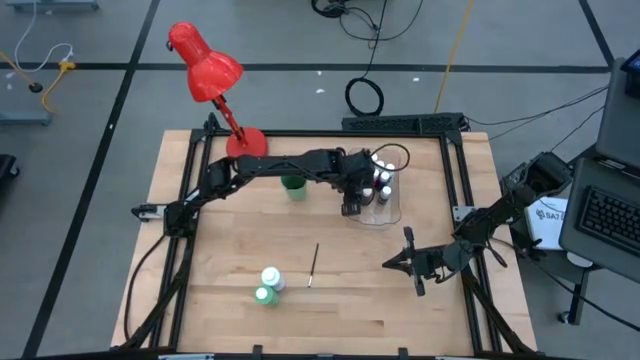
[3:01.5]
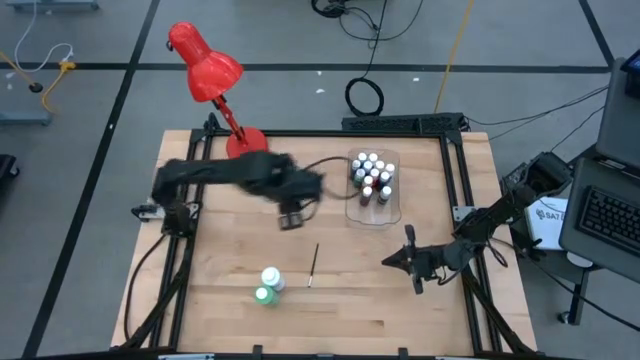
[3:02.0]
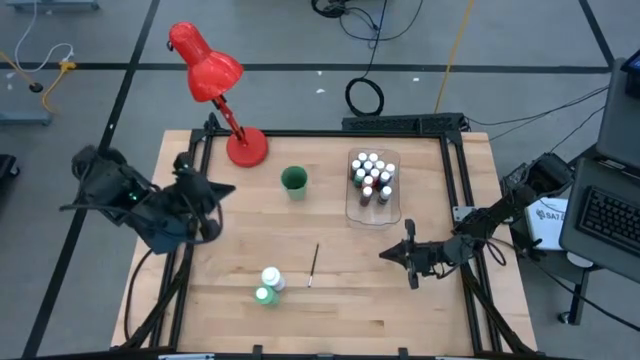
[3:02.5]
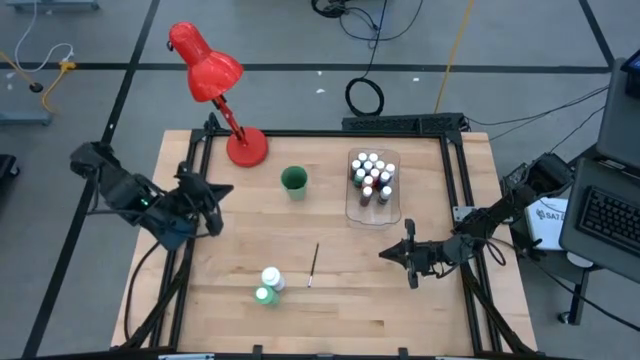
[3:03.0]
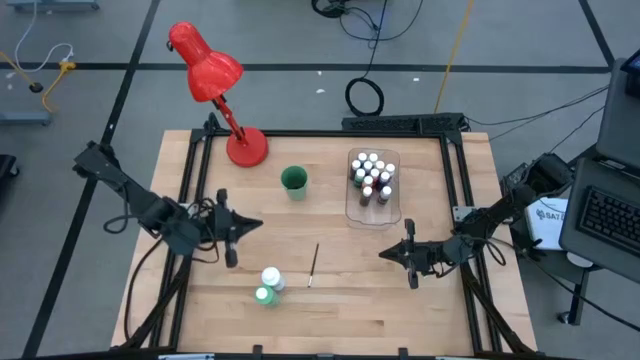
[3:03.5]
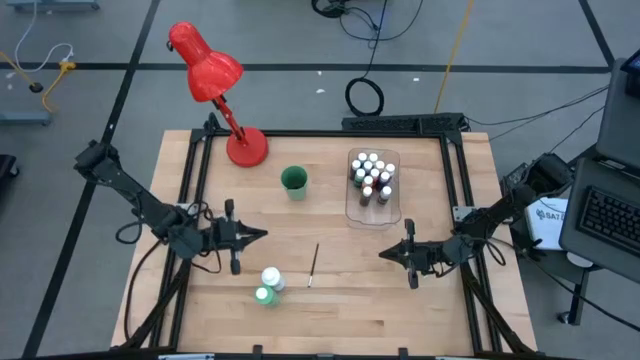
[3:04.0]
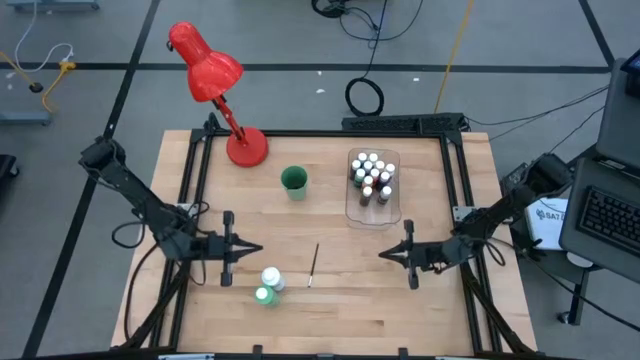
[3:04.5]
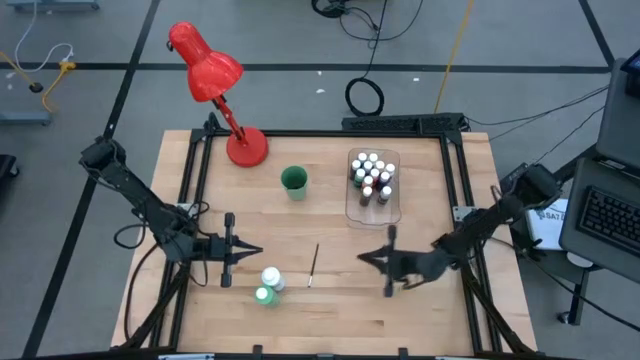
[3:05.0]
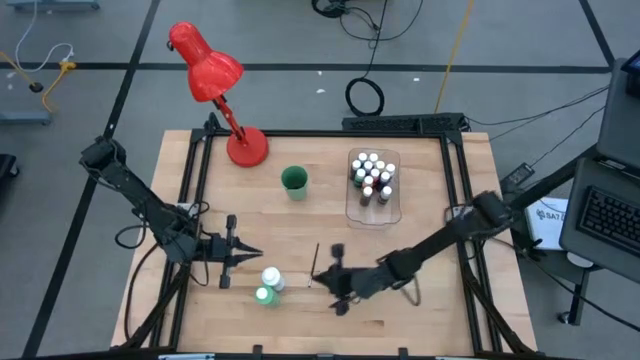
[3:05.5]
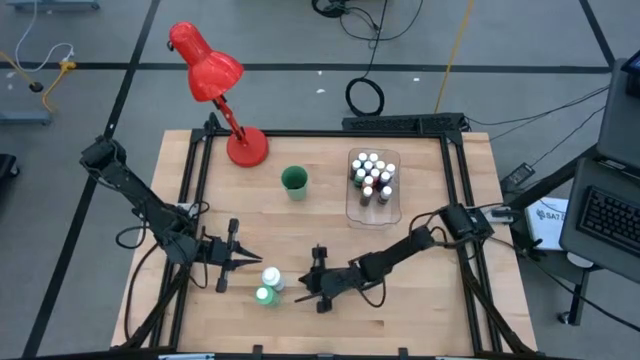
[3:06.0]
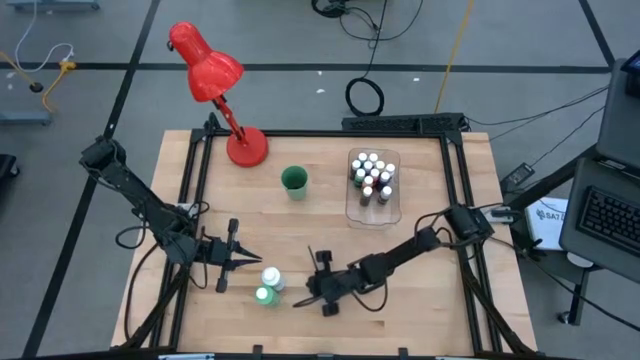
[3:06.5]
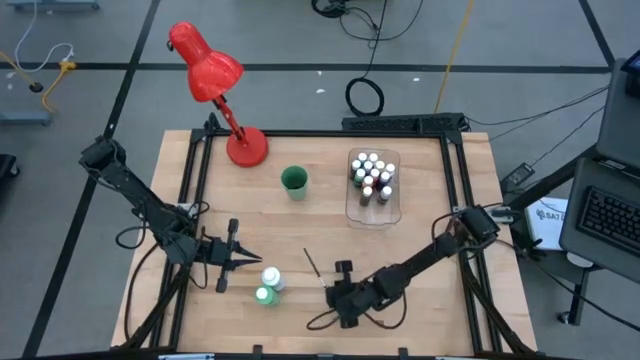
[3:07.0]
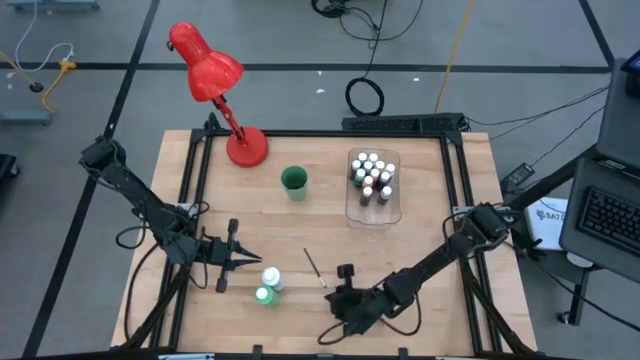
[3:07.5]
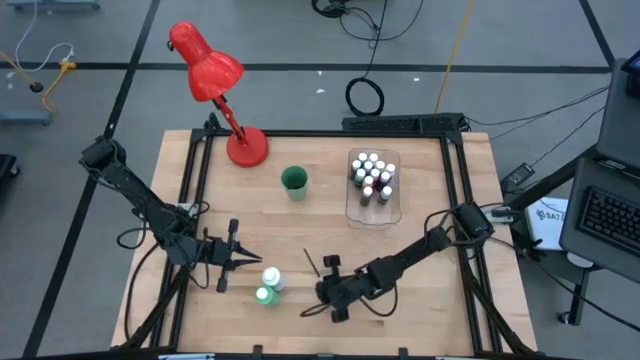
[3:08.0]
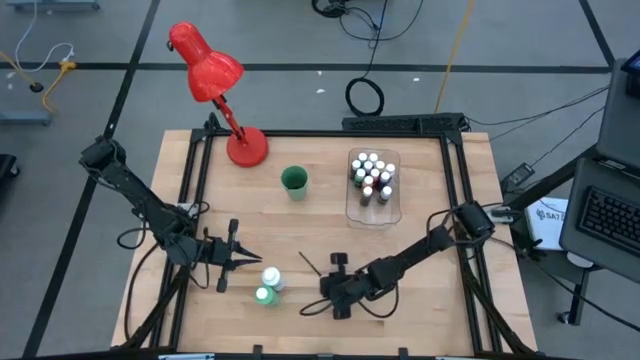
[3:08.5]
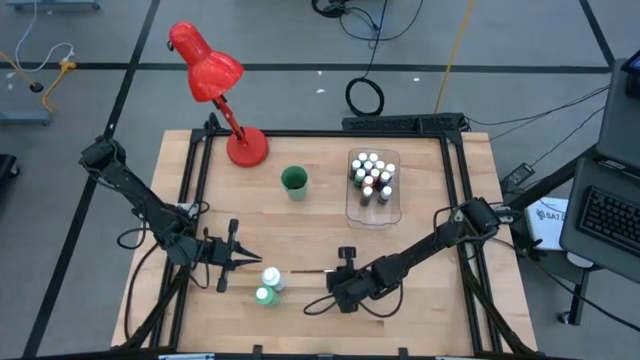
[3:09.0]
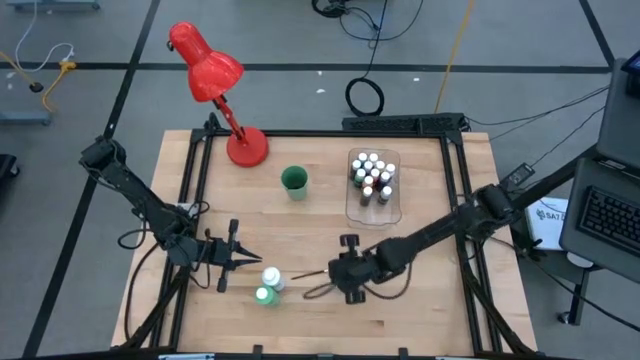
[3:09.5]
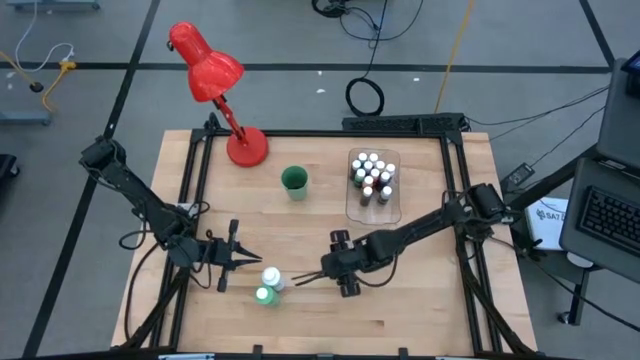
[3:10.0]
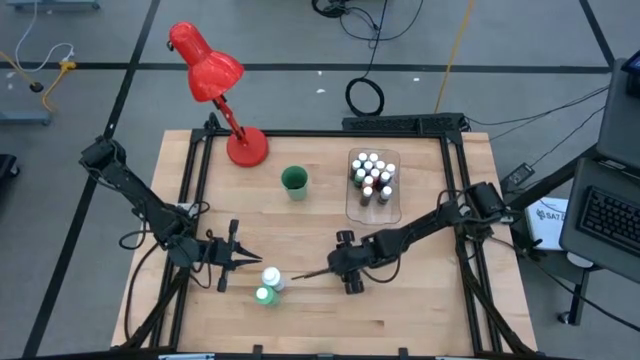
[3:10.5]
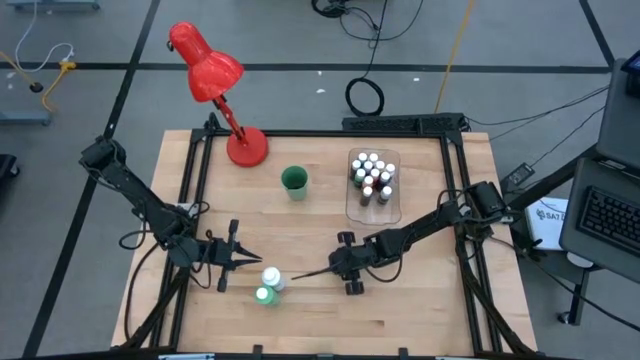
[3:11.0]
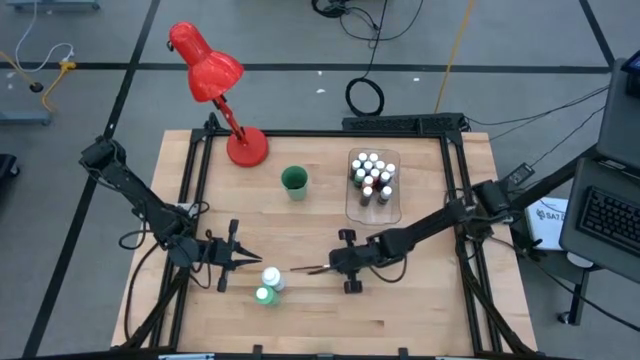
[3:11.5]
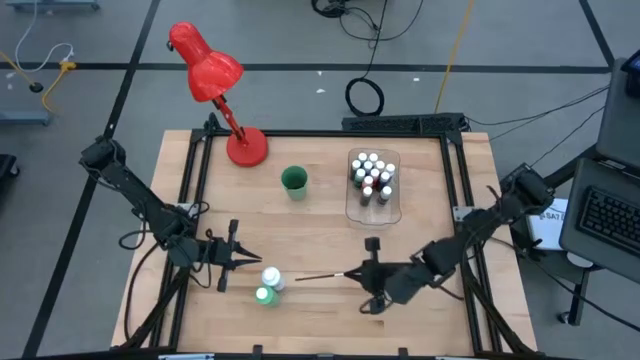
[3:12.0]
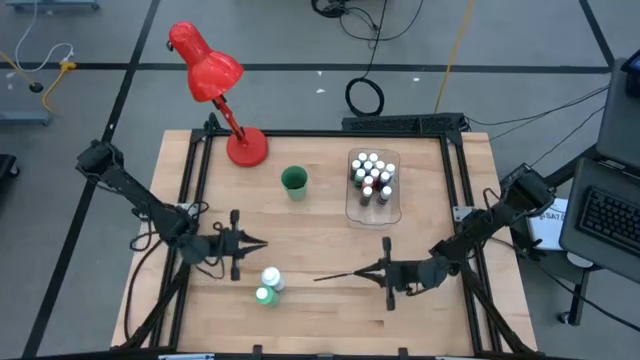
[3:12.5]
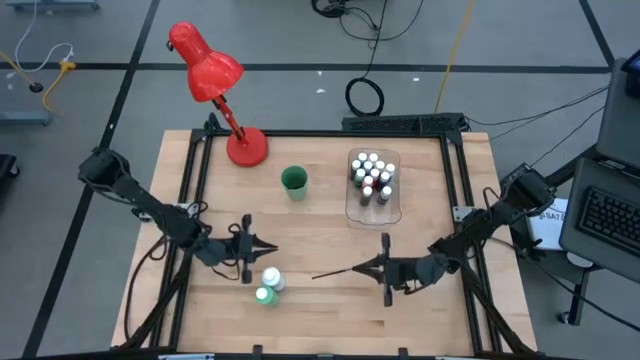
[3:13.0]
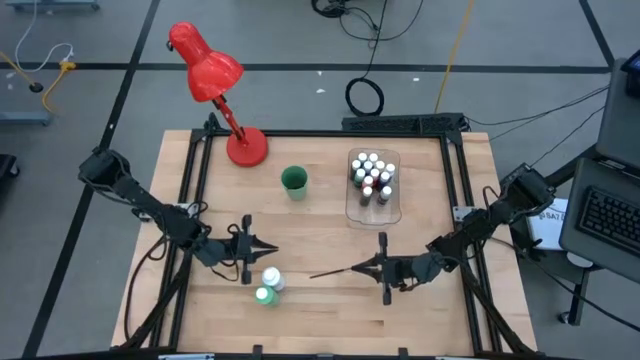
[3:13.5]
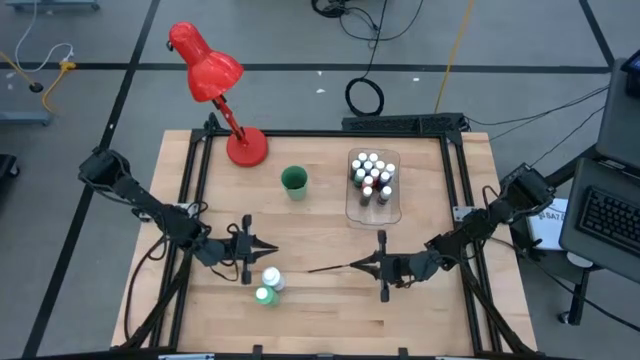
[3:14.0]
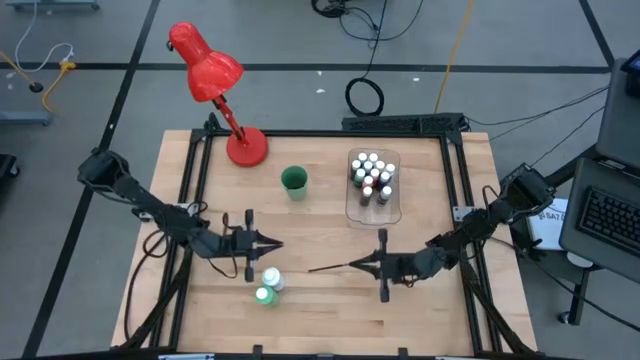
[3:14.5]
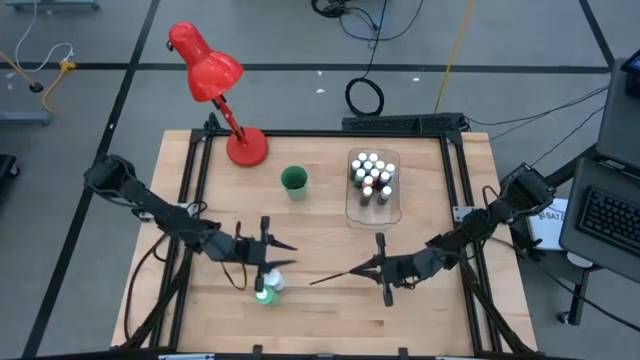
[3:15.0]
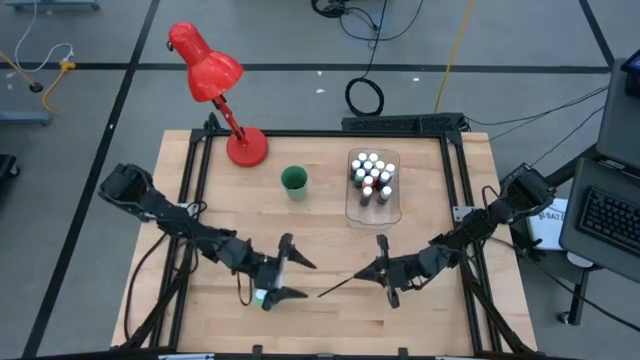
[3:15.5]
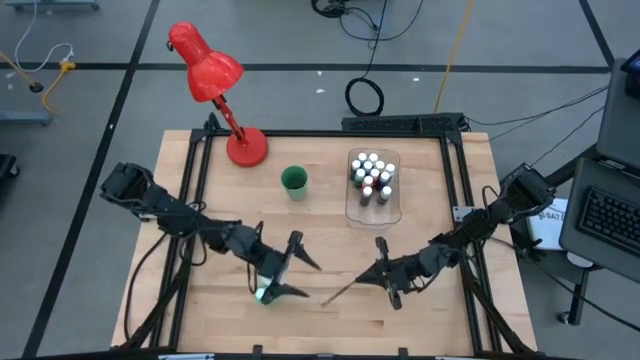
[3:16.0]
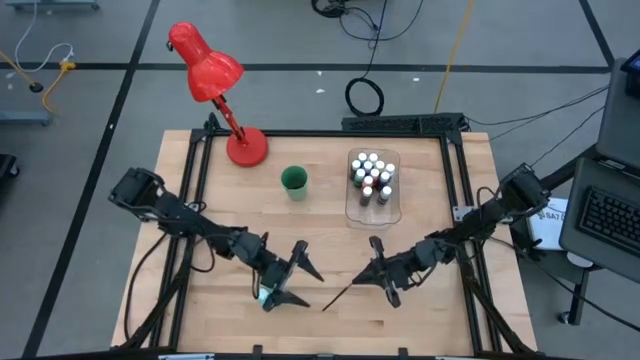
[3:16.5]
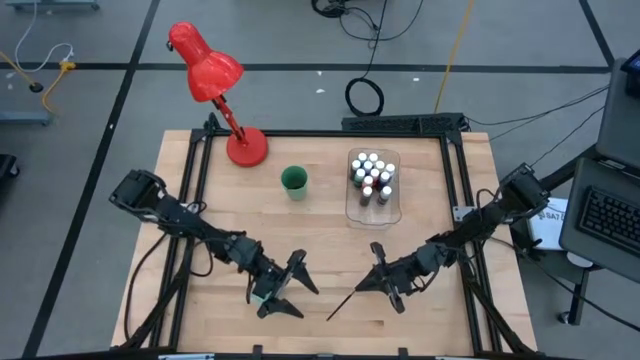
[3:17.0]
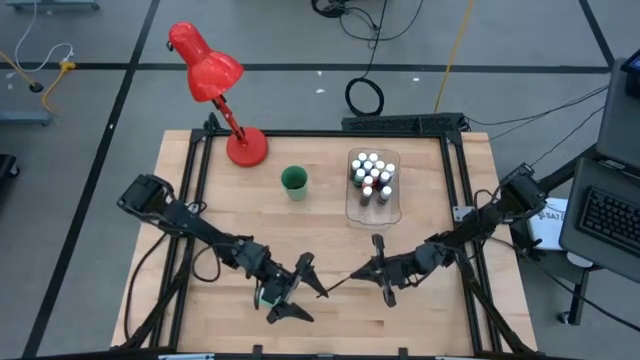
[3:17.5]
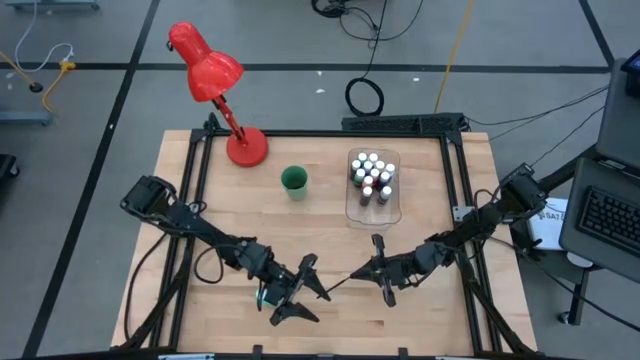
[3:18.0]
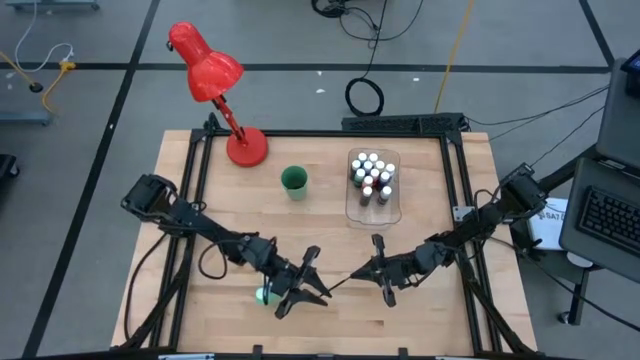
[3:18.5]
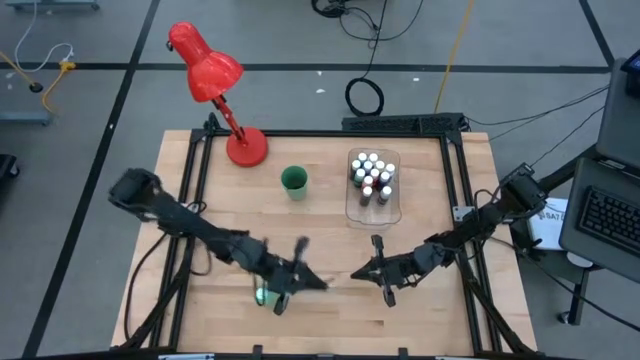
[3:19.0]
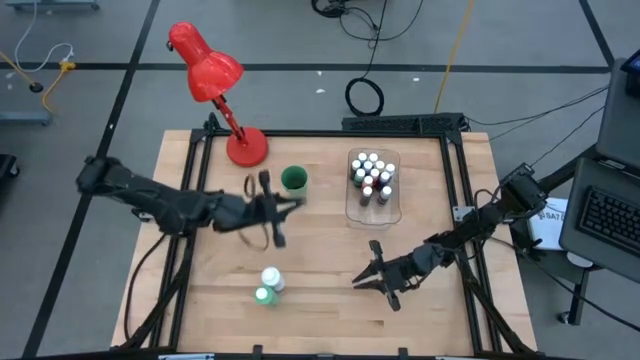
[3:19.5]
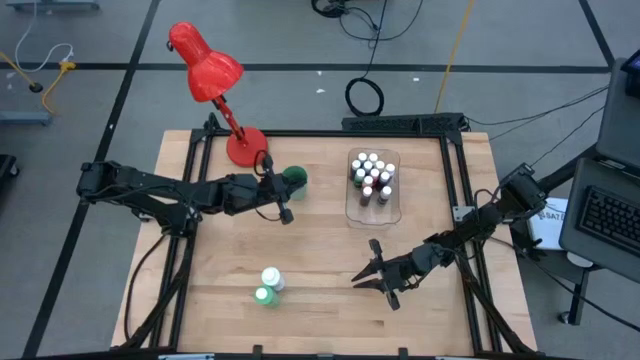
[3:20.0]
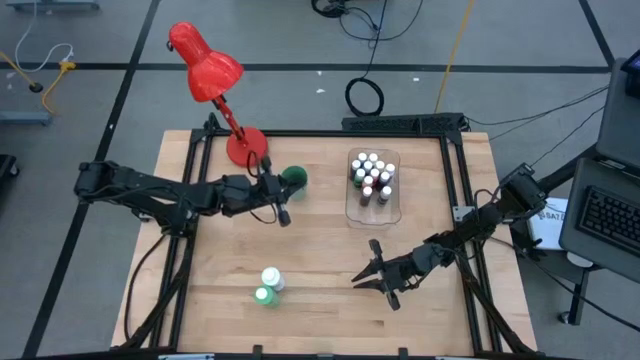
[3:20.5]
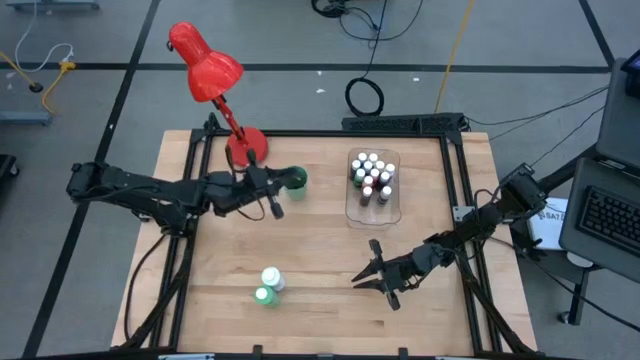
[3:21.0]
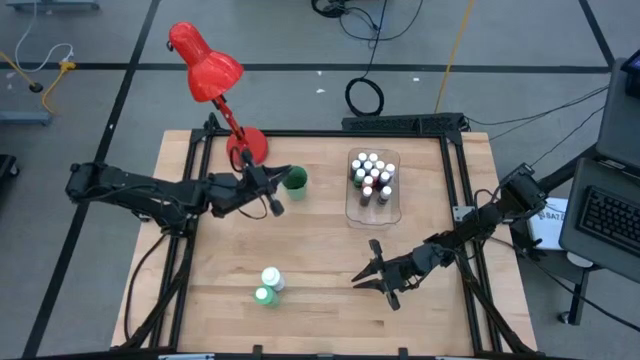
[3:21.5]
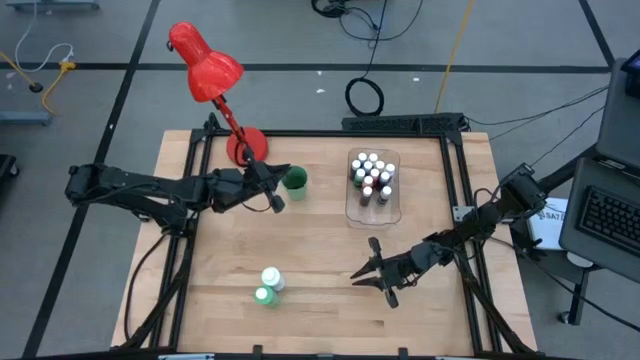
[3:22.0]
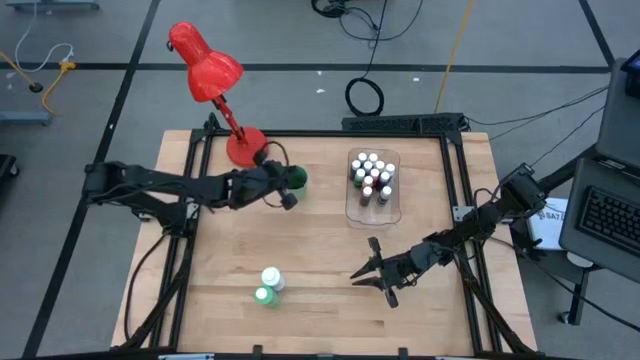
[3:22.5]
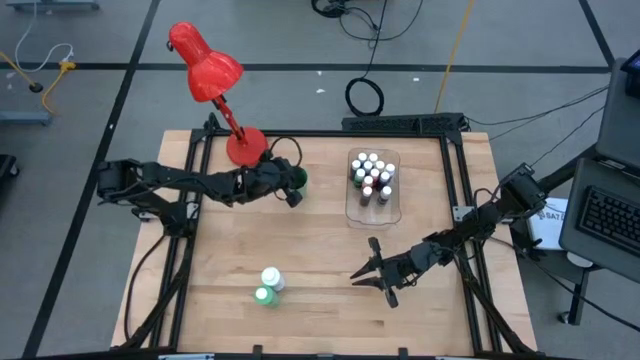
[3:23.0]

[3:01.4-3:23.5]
Task: Pick & Place Paint Supplies
Put the black paint brush into the cup
